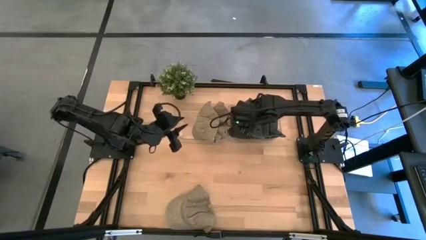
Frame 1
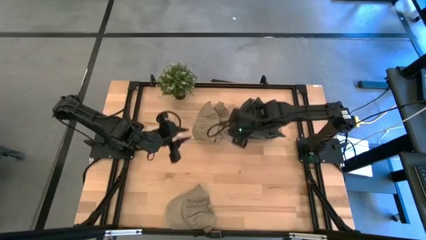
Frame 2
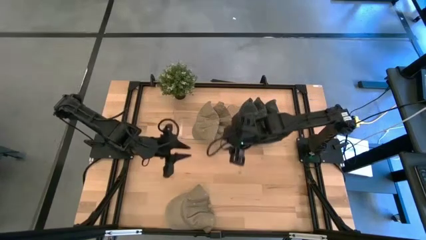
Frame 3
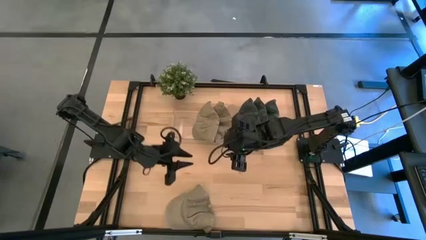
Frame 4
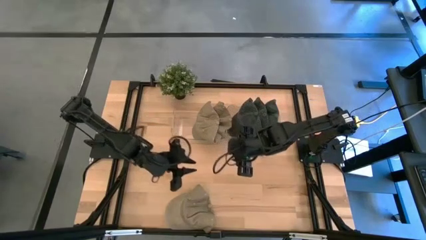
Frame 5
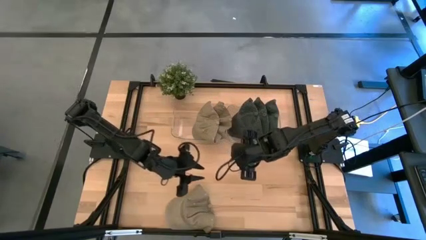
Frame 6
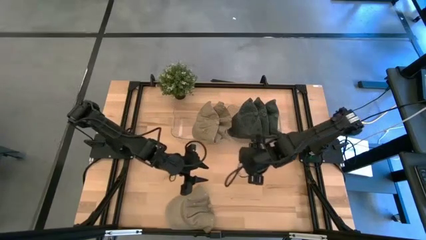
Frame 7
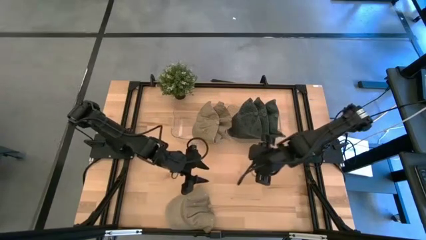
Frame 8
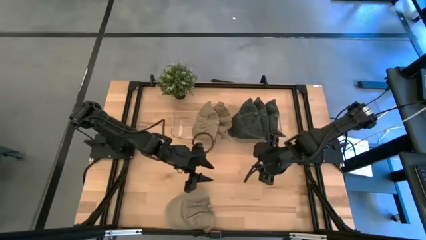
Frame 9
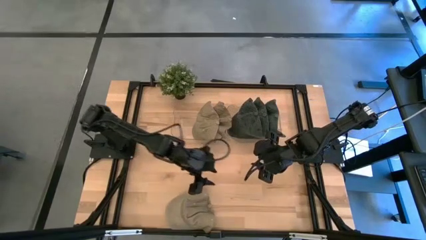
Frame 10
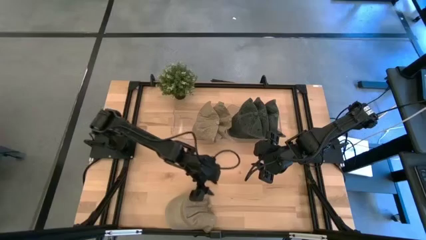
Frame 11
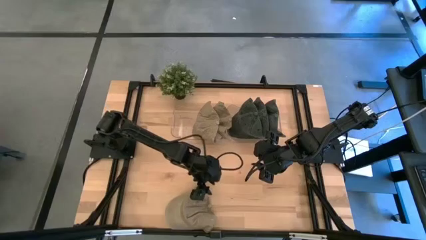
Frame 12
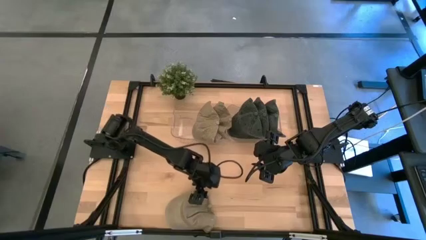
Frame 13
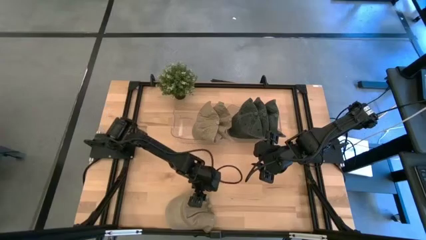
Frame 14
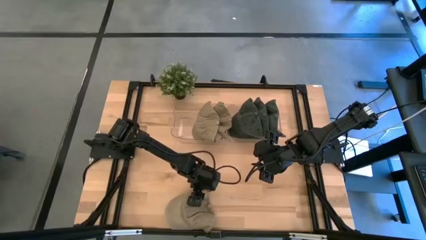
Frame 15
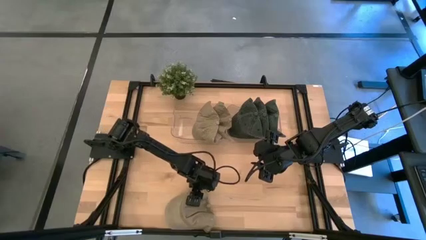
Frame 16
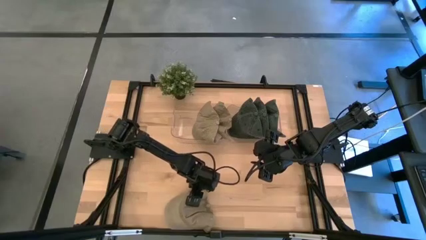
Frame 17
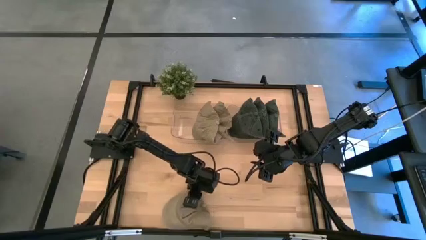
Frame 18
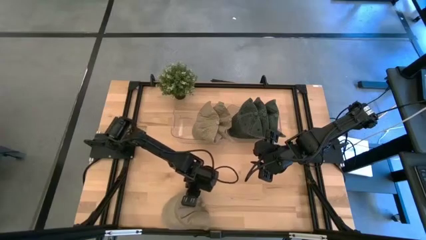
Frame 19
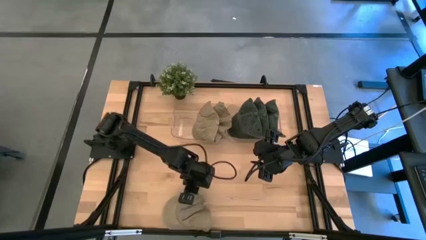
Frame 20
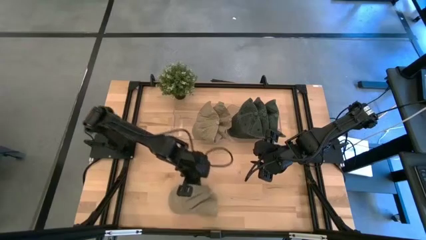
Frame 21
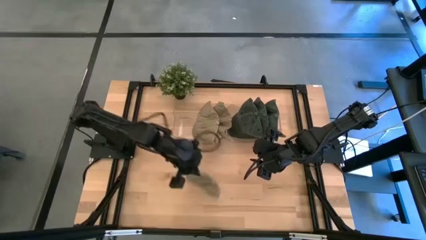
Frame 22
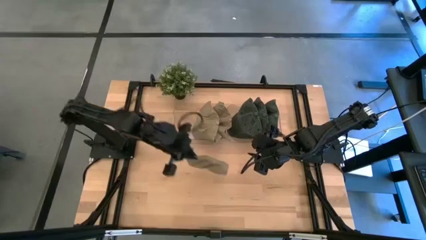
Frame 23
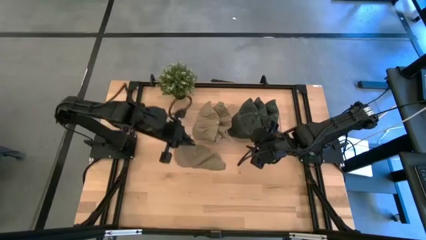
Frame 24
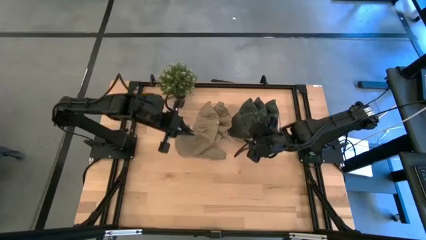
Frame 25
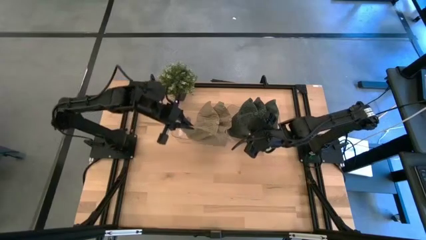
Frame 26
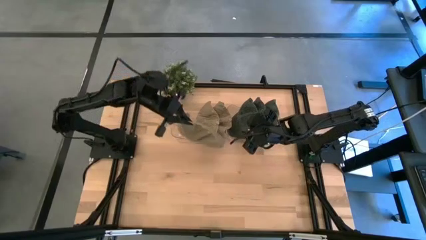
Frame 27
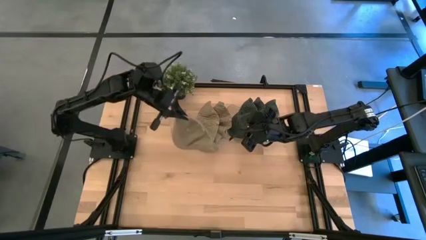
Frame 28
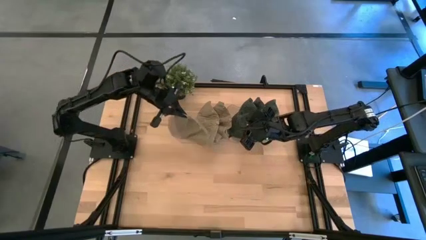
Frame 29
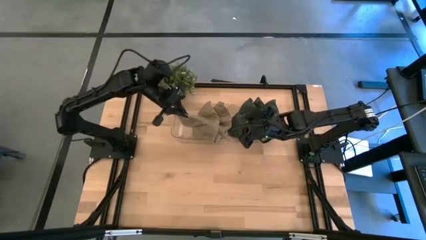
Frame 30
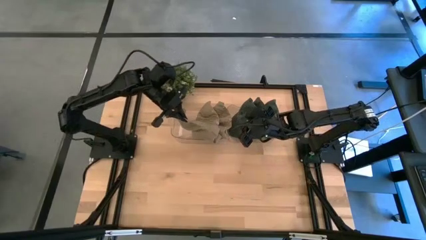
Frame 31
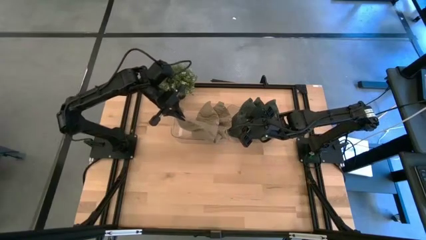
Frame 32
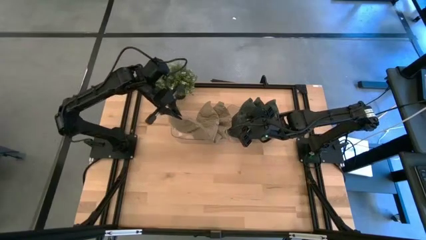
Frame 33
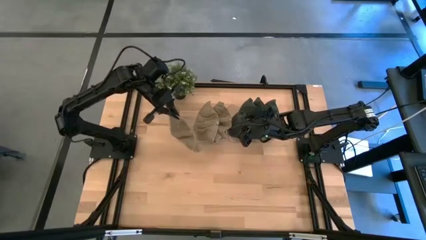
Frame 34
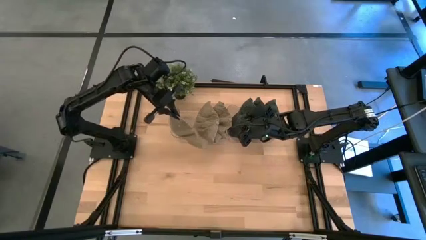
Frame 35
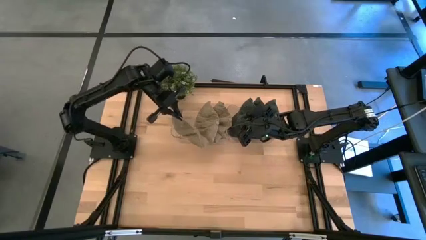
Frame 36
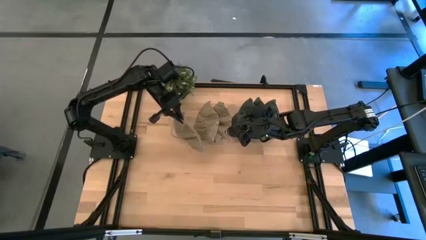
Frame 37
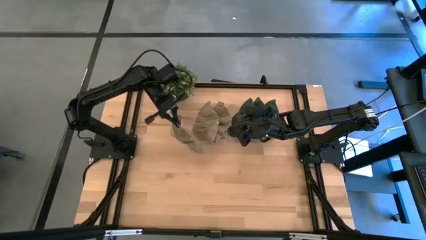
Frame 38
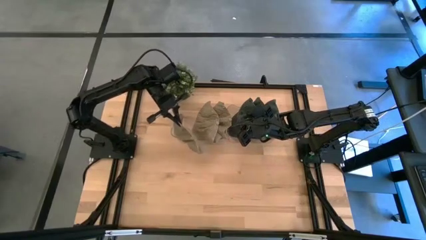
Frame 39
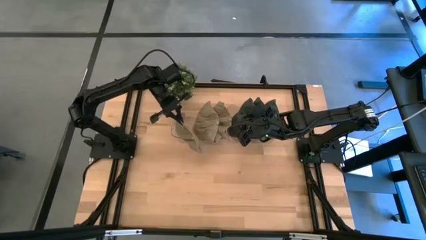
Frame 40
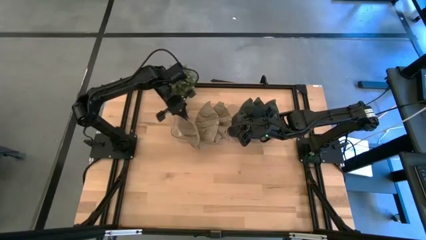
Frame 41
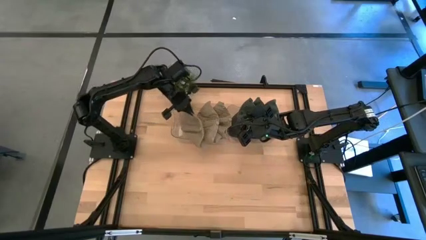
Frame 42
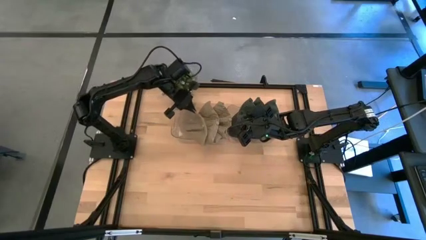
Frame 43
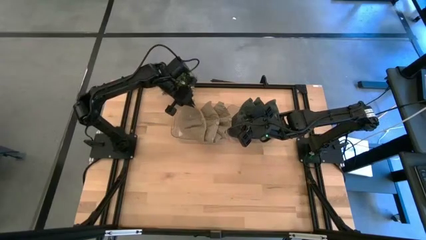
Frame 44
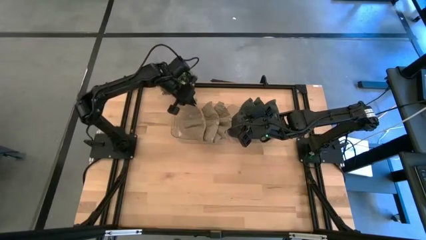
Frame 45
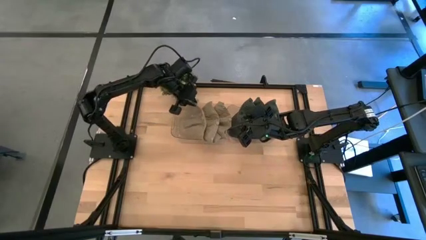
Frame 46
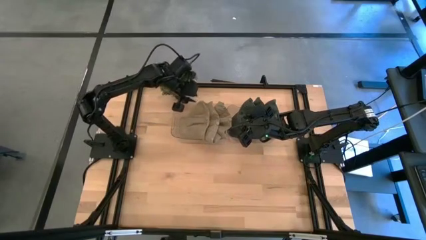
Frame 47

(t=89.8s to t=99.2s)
Task: Pick & Place hat
Put the brown cap into the left transparent bin

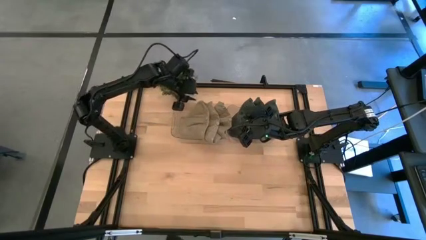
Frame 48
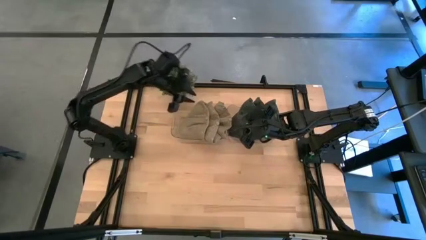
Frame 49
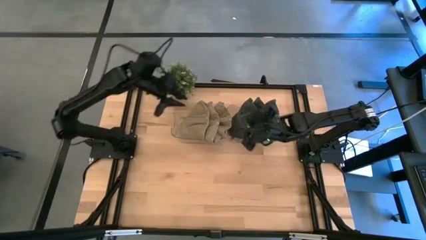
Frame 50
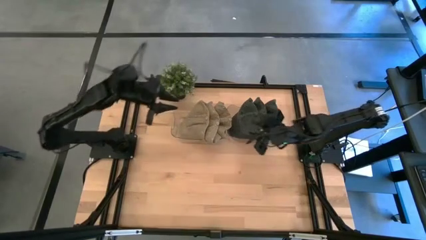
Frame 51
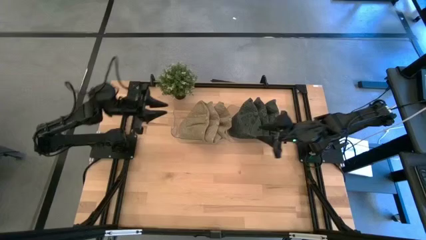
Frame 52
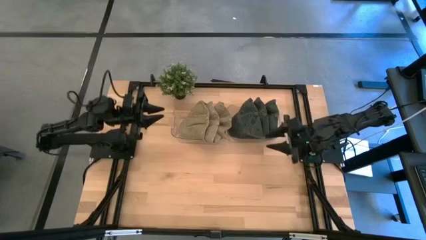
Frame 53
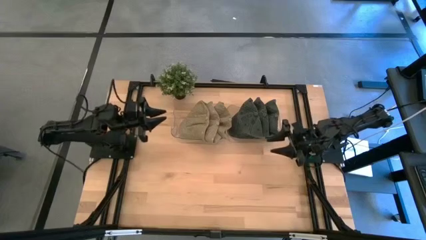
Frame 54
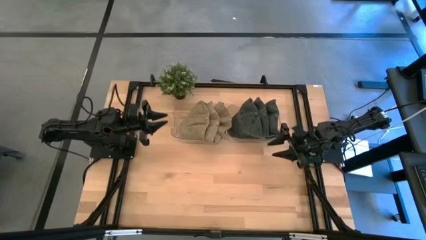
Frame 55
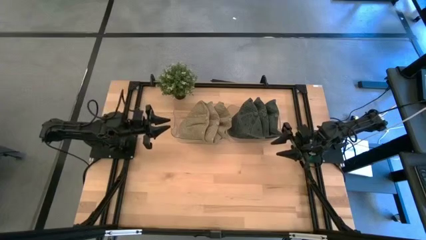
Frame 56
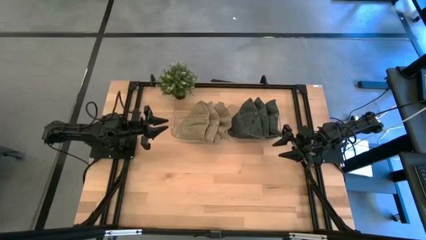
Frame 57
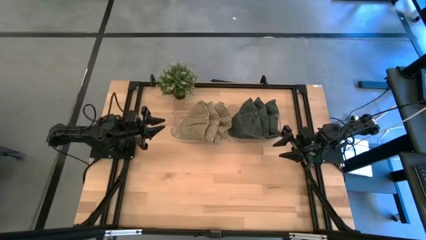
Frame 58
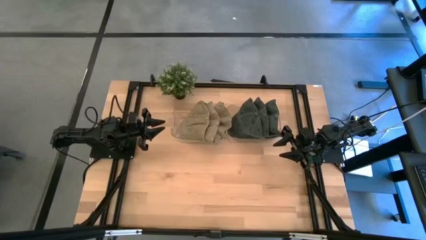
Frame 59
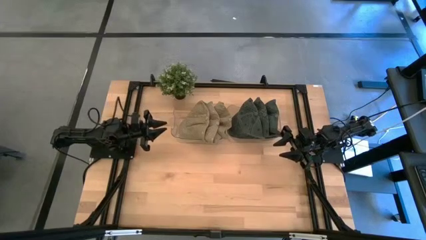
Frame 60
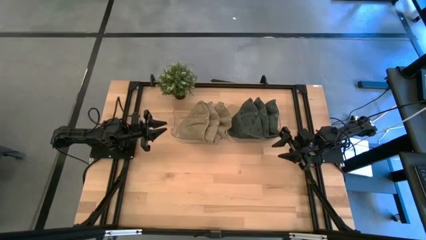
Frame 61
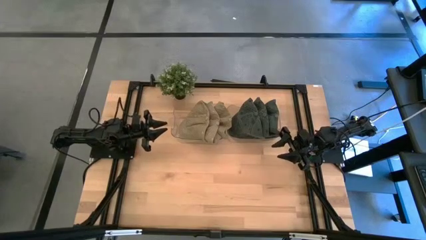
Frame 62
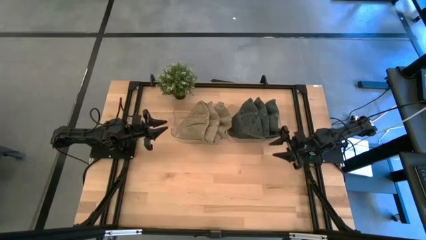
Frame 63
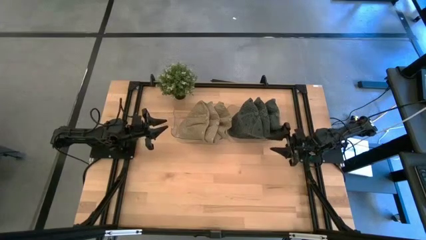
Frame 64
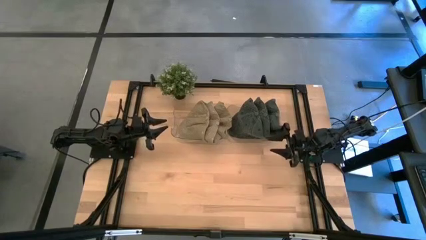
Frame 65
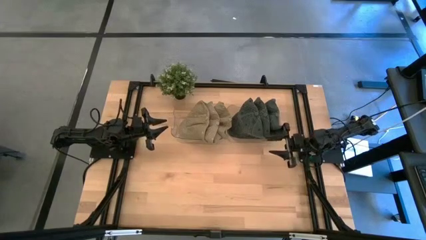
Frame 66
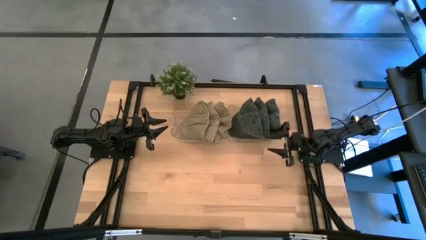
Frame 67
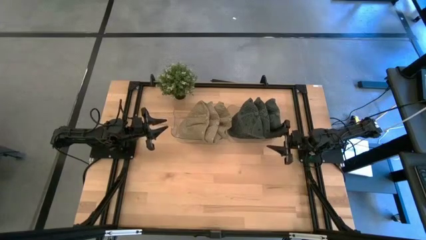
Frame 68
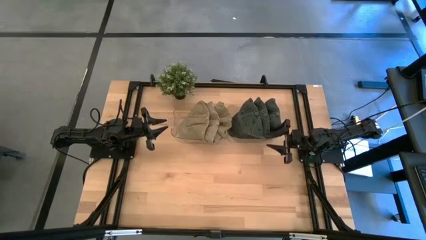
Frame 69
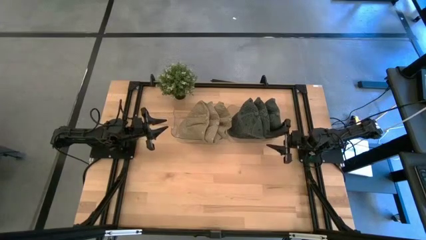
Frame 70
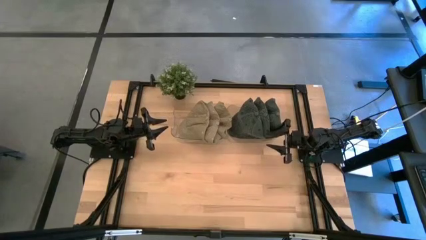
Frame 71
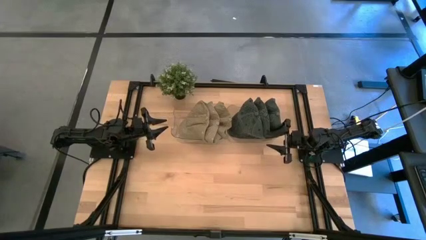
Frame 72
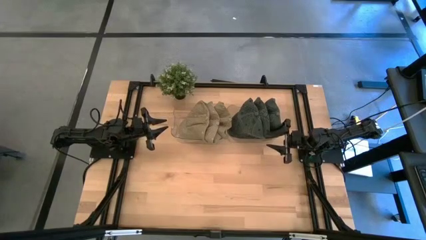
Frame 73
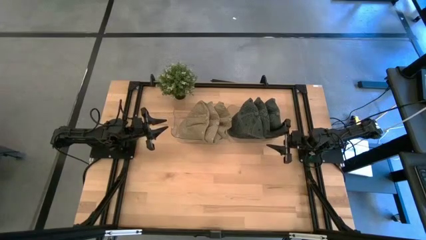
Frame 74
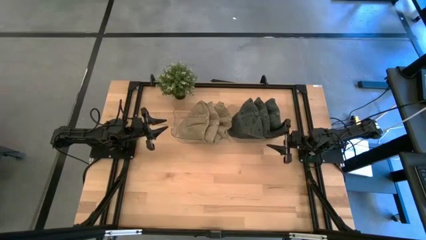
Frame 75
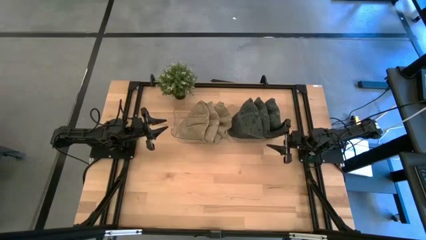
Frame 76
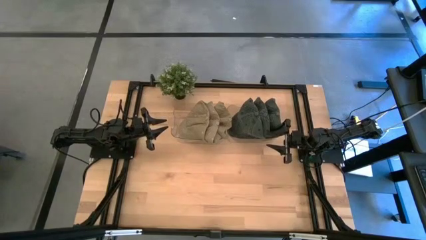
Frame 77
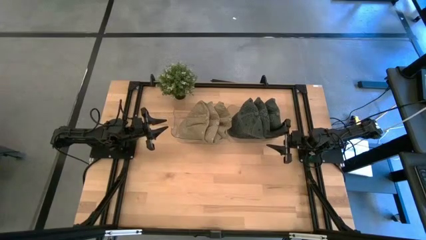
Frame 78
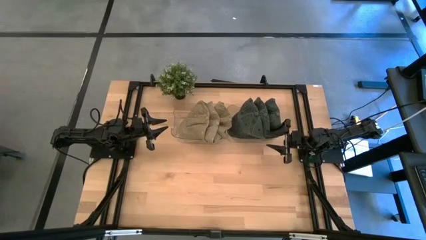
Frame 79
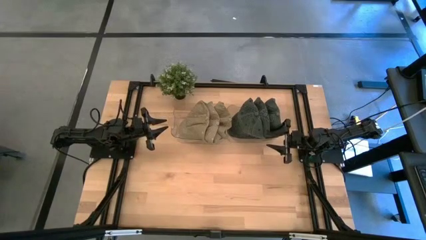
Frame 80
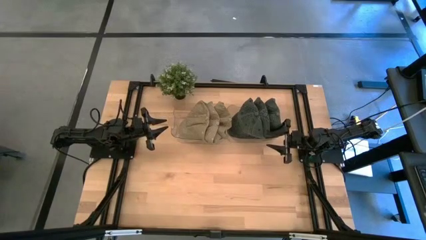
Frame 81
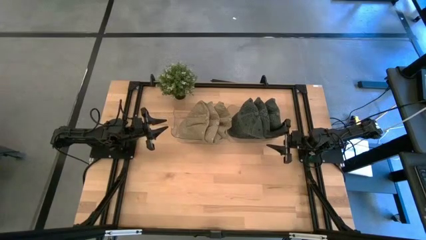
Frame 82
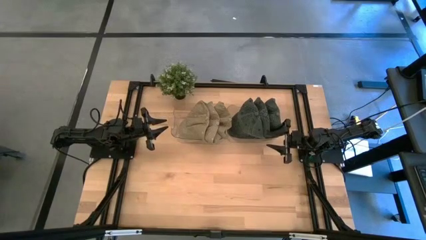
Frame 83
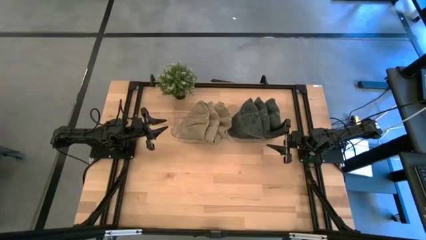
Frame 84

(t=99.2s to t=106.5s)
Return to Home Position
